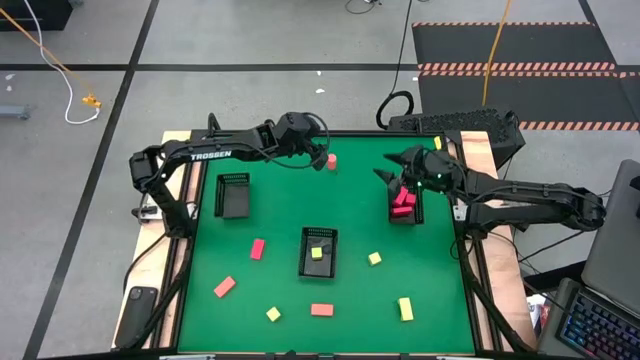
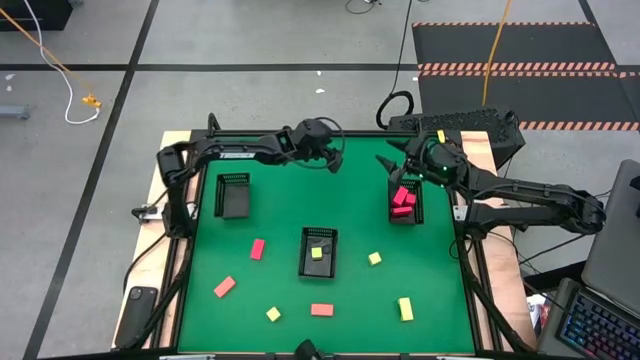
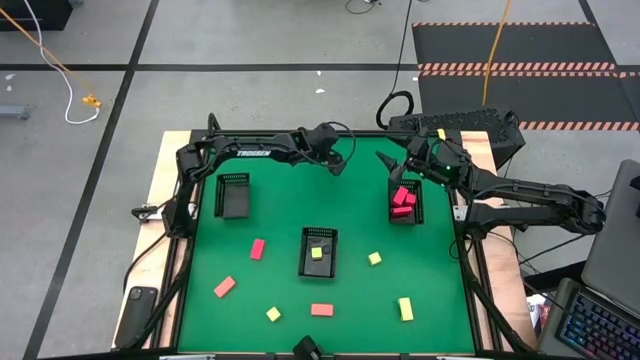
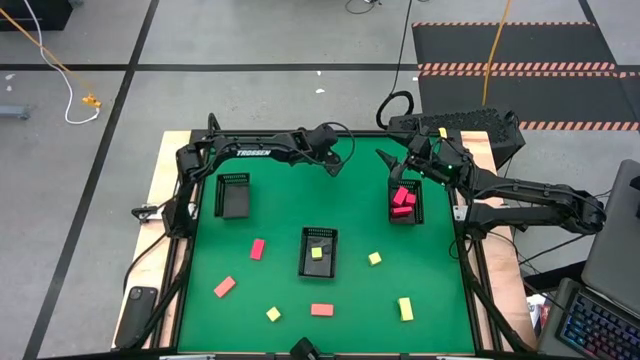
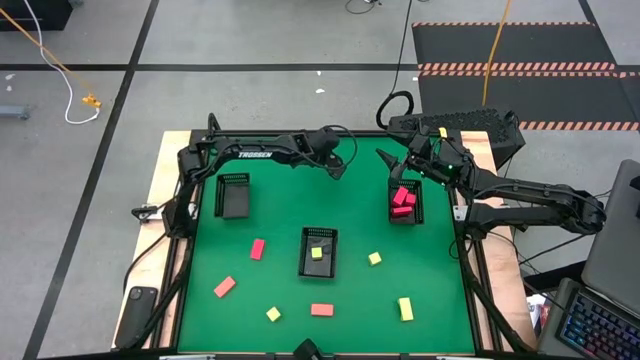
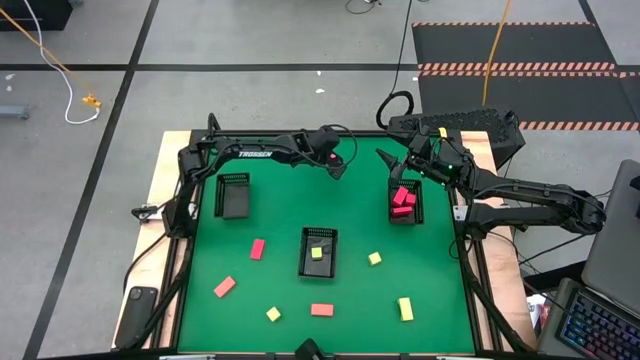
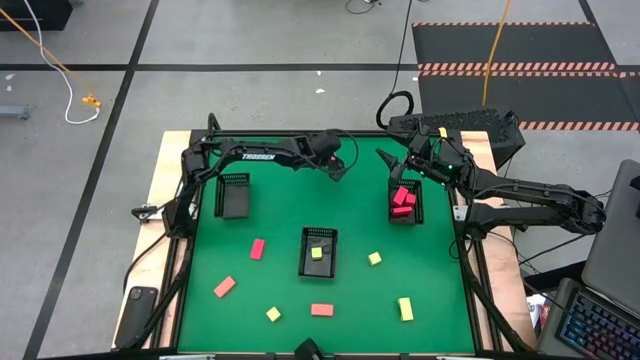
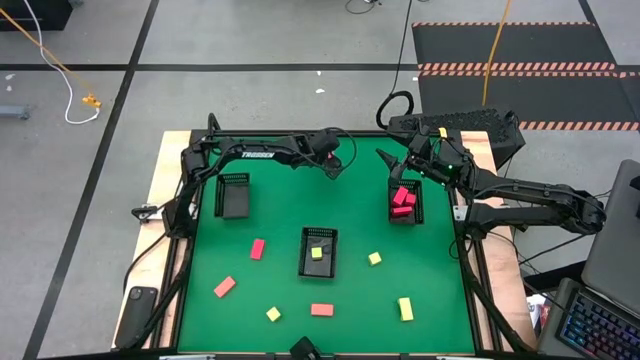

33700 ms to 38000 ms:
Task: Sort & place blocks by color
Put the pink block into the top left black basket

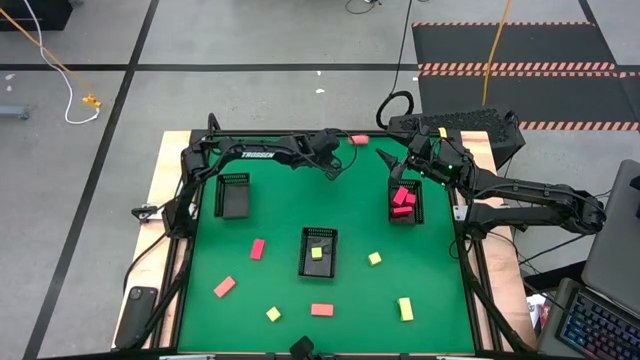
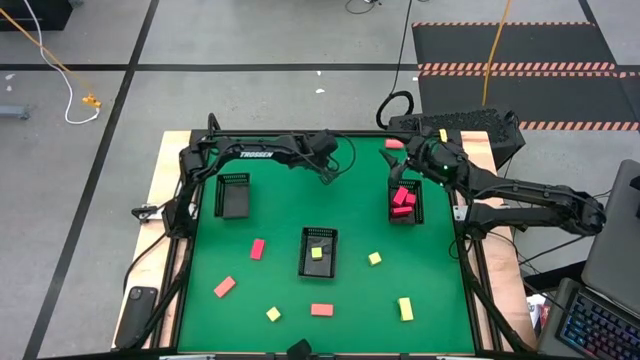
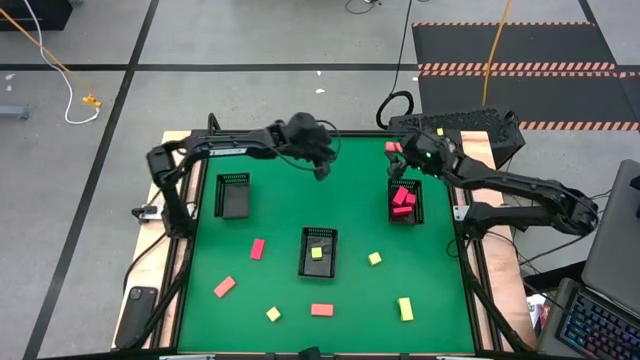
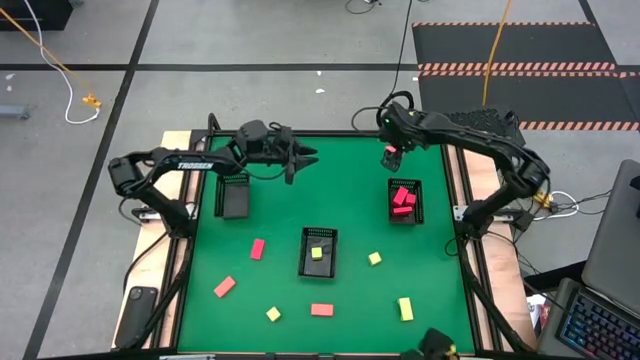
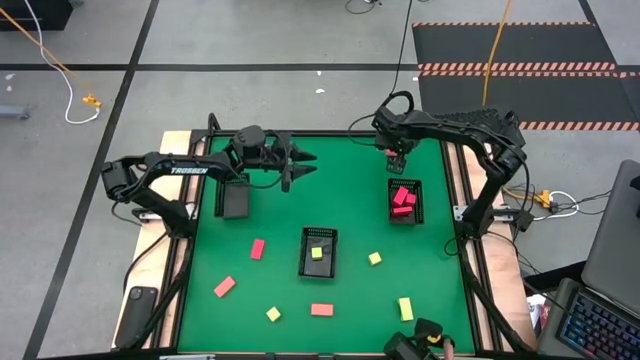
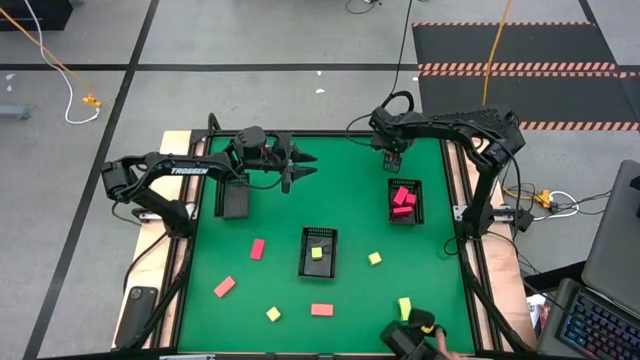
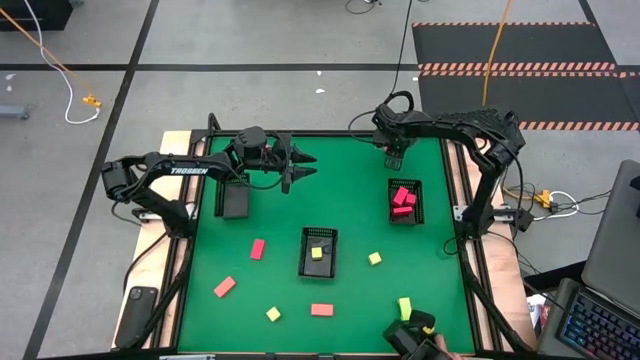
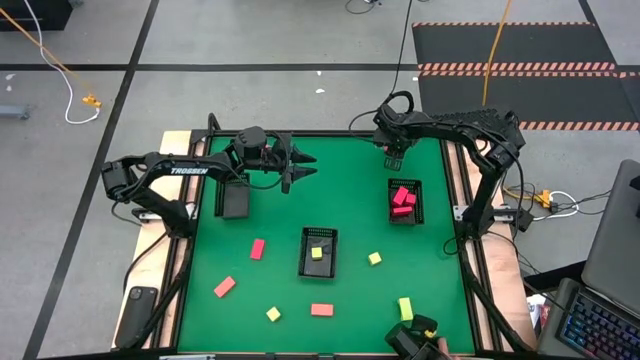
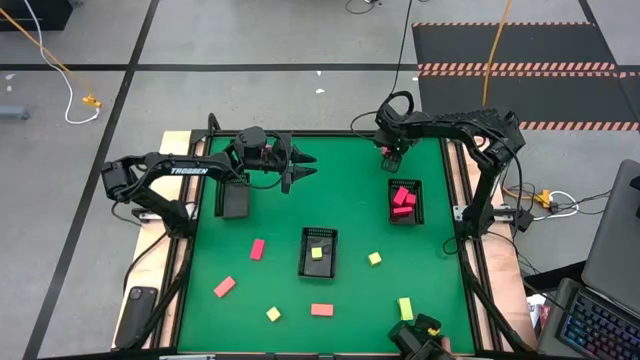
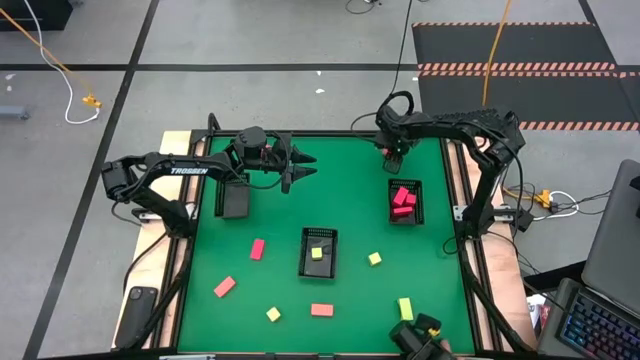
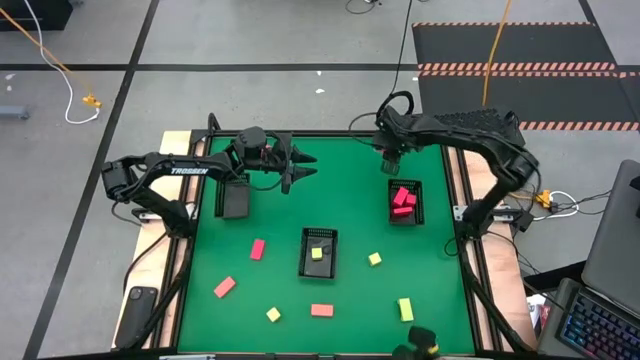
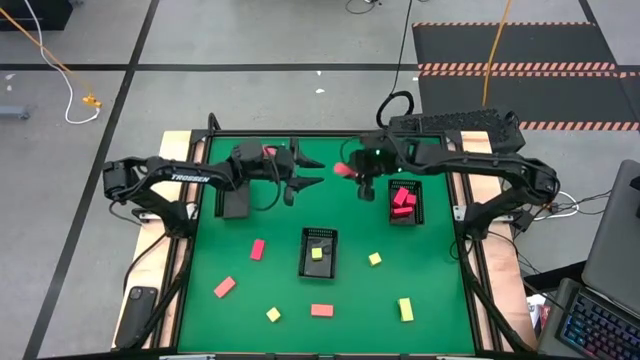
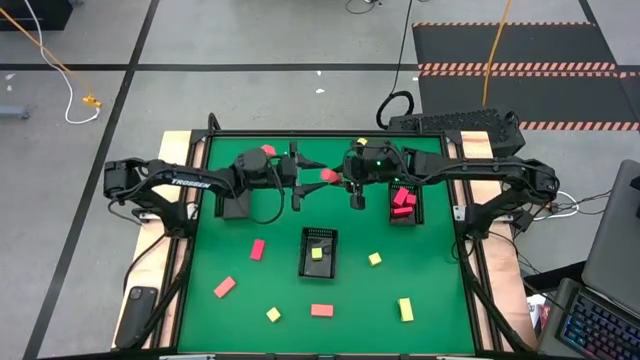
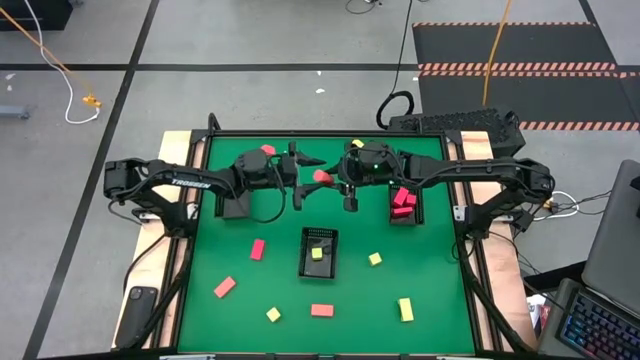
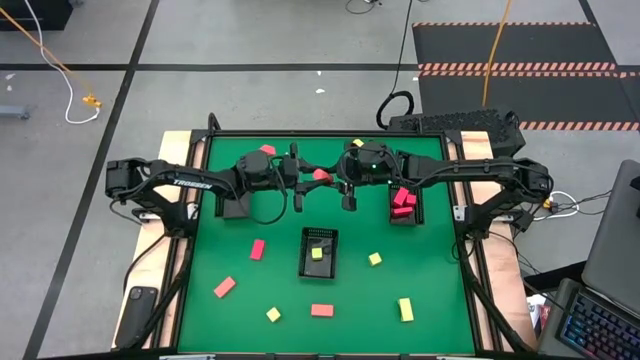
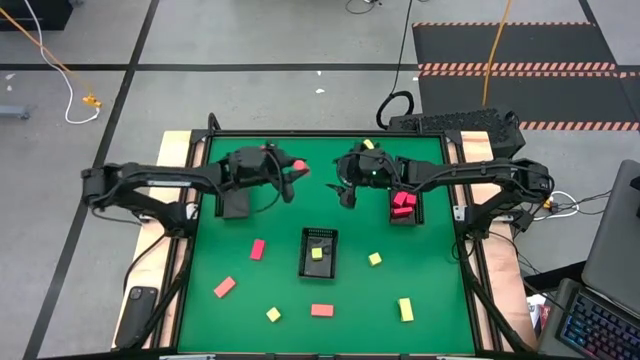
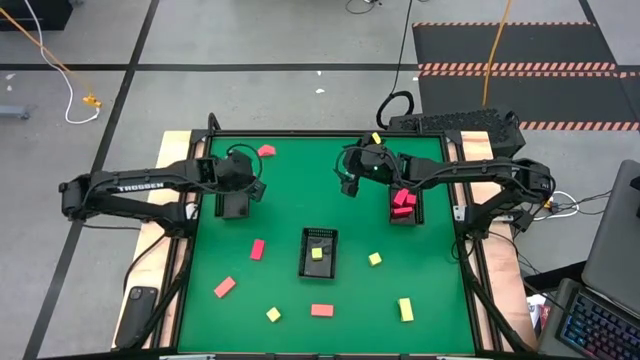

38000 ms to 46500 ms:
Put the pink block into the top left black basket

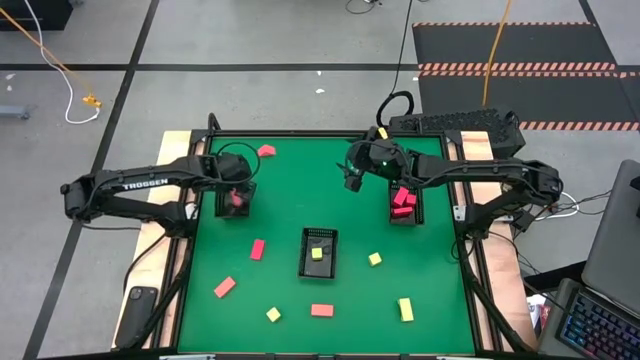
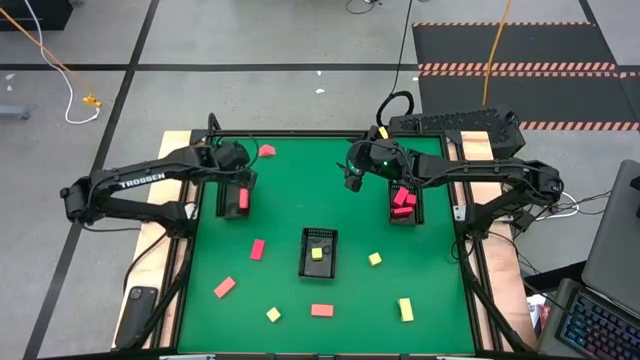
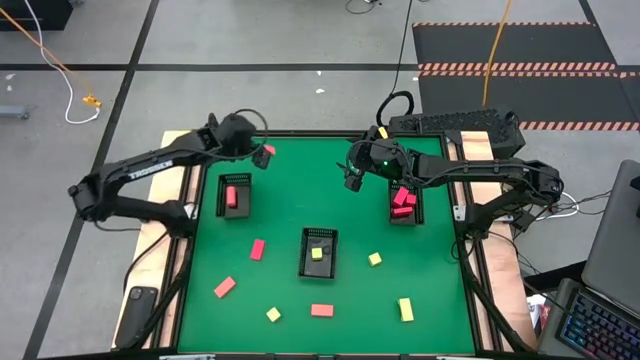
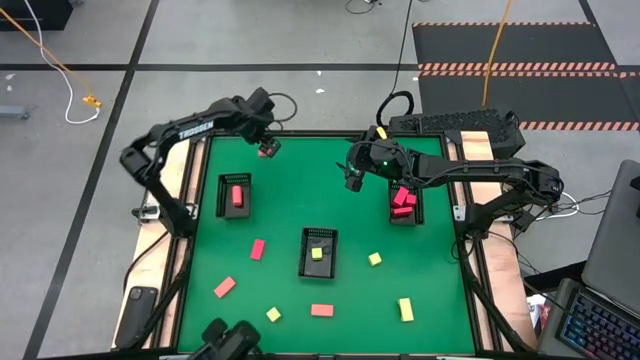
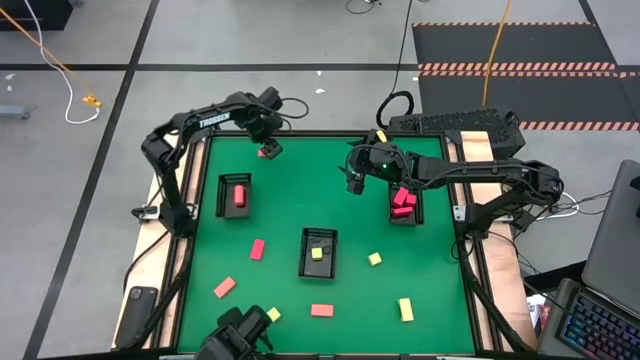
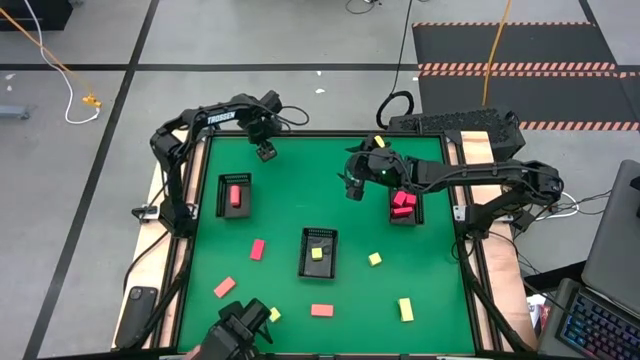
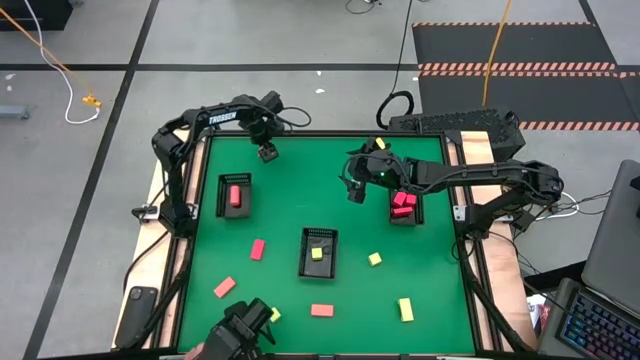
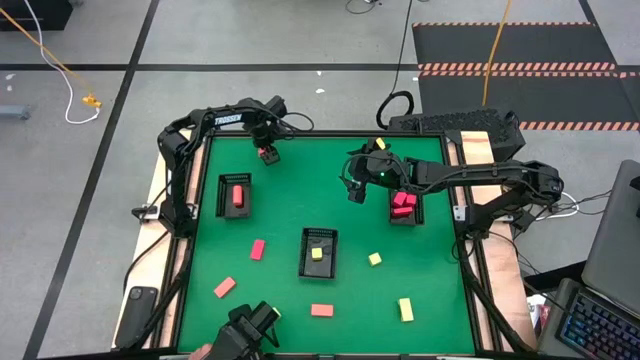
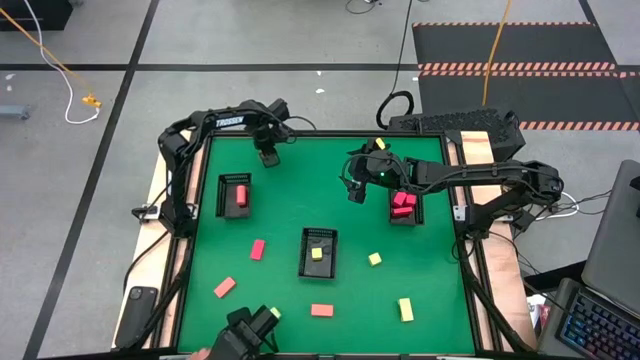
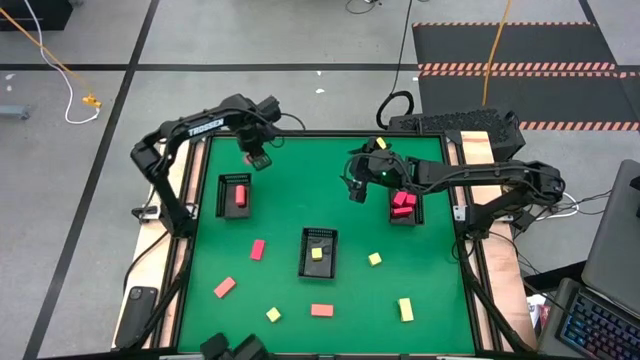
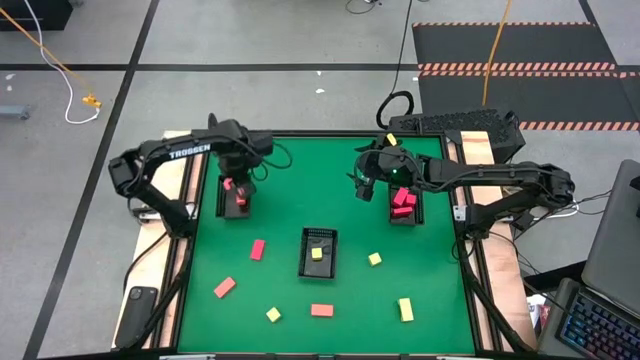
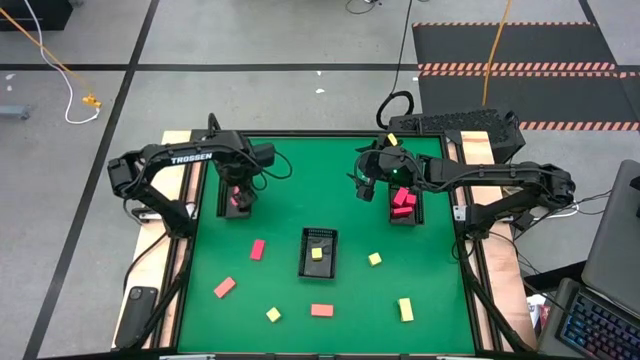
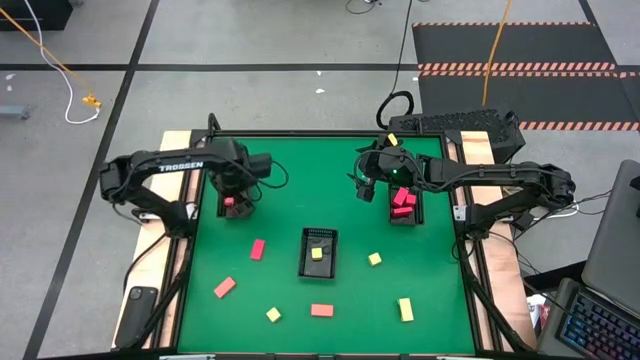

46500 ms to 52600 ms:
Put the pink block into the top left black basket

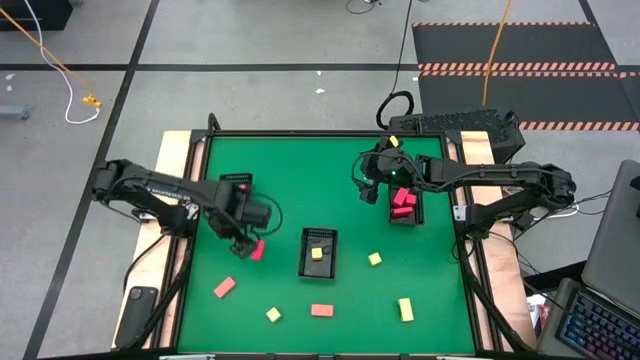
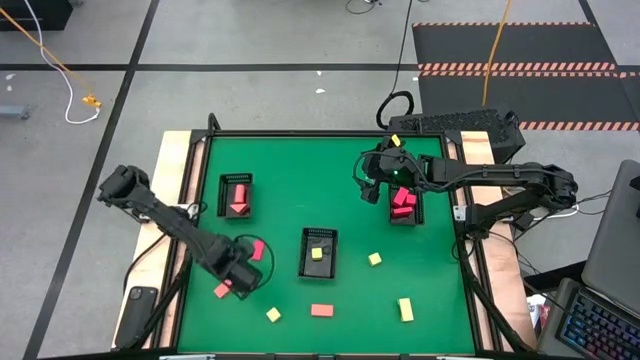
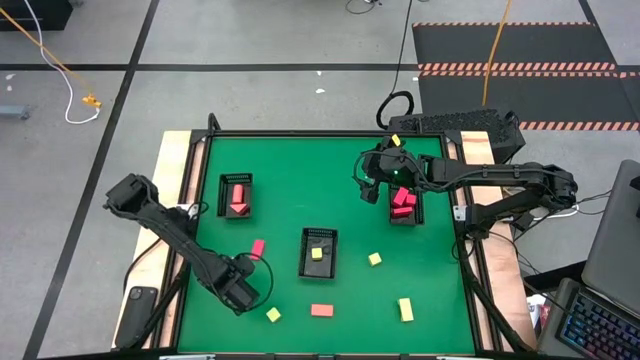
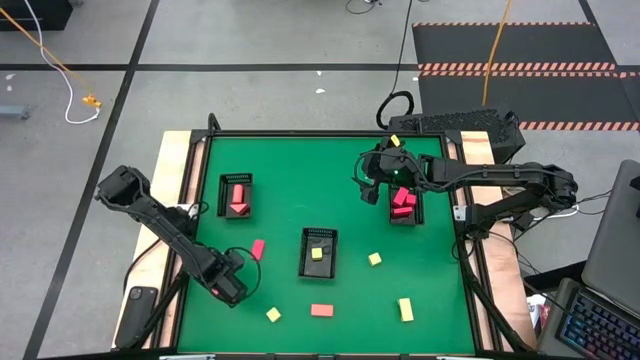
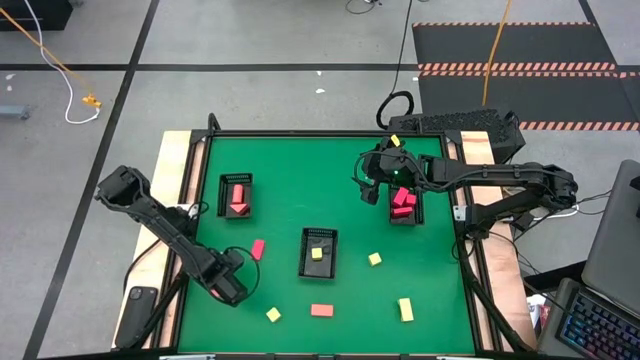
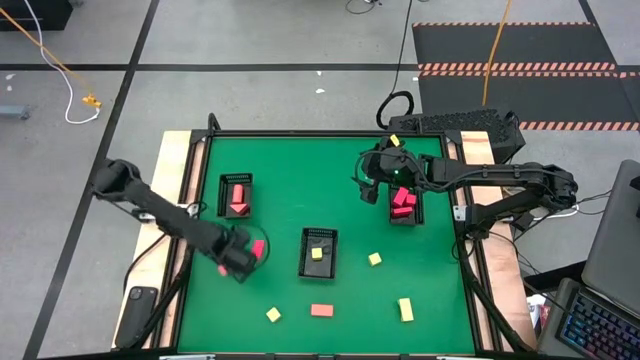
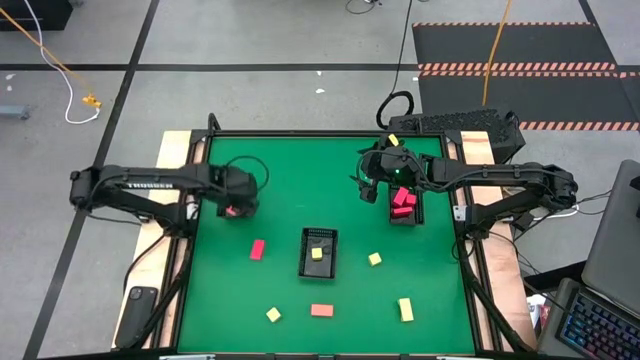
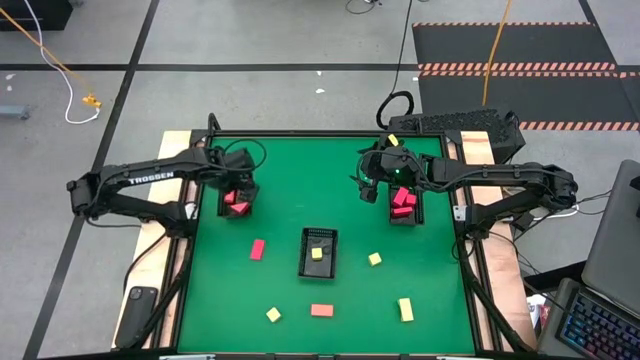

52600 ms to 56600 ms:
Put the pink block into the top left black basket
